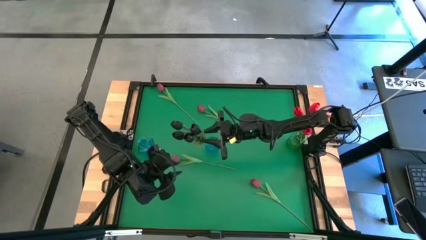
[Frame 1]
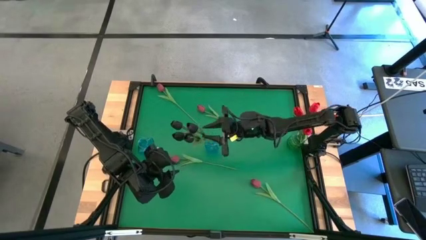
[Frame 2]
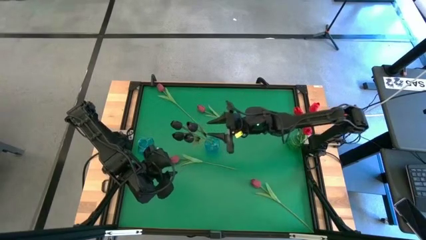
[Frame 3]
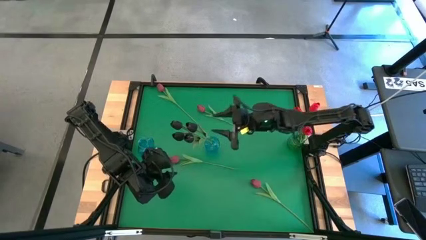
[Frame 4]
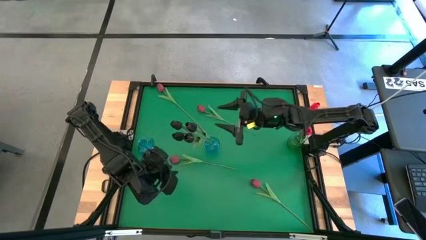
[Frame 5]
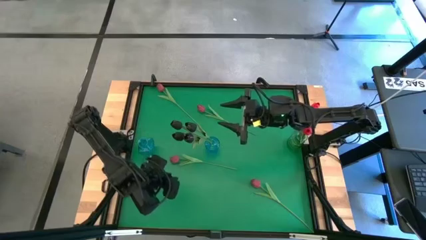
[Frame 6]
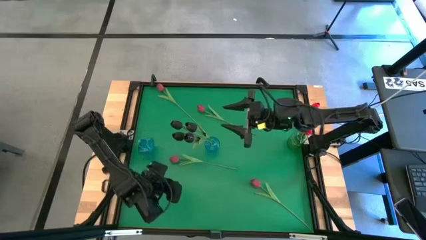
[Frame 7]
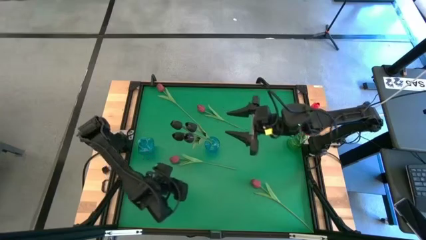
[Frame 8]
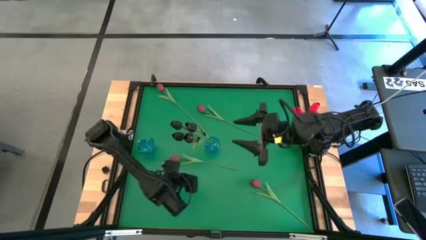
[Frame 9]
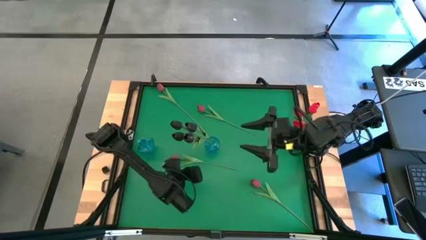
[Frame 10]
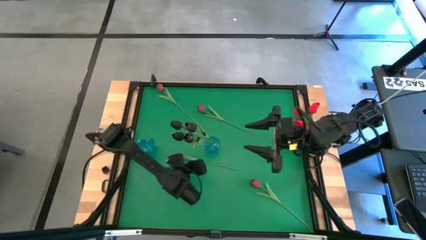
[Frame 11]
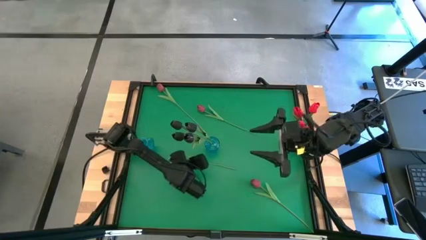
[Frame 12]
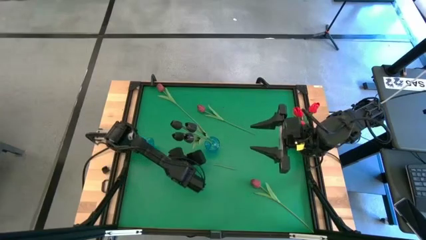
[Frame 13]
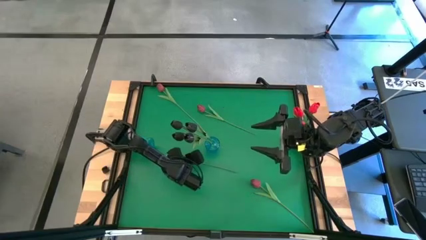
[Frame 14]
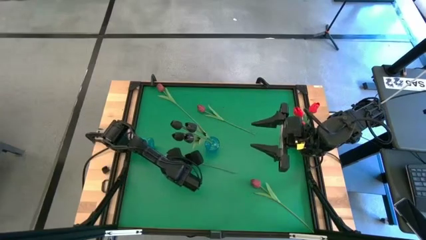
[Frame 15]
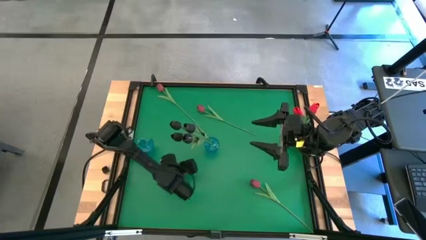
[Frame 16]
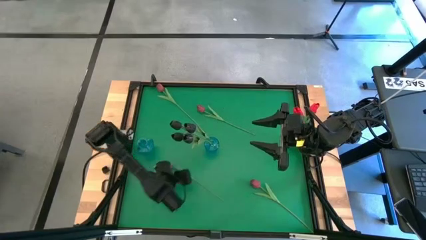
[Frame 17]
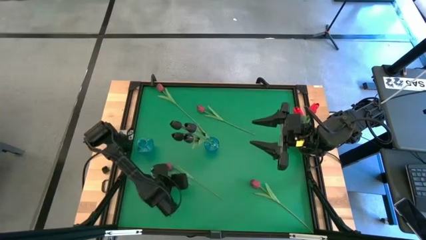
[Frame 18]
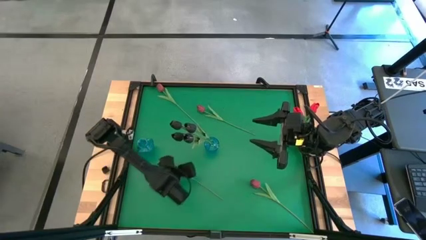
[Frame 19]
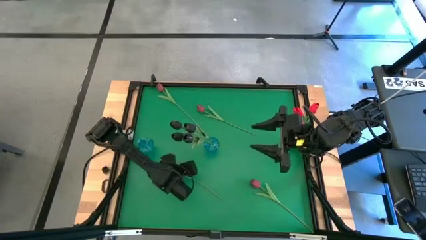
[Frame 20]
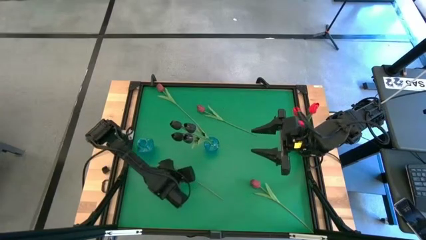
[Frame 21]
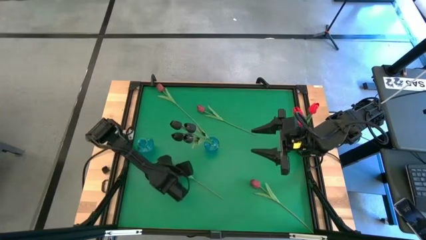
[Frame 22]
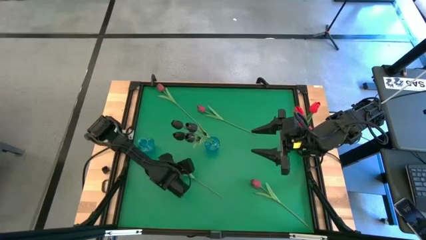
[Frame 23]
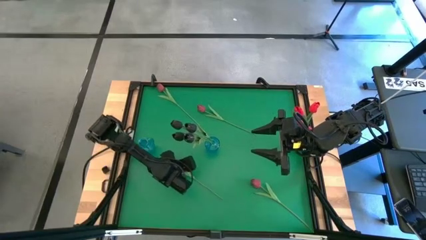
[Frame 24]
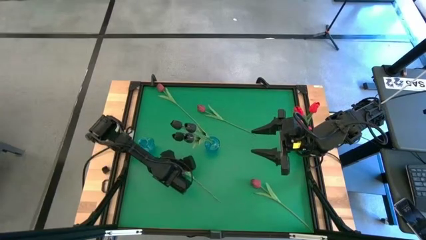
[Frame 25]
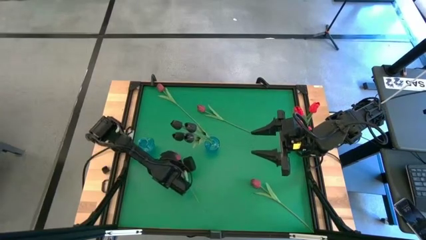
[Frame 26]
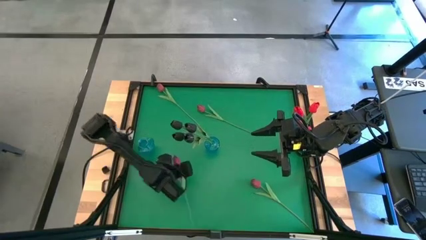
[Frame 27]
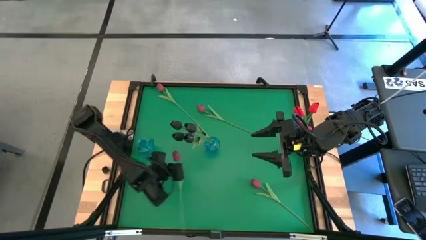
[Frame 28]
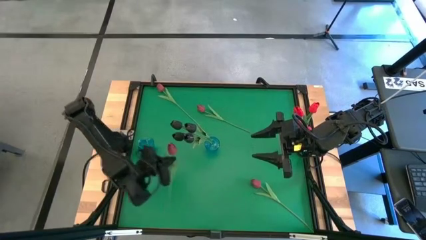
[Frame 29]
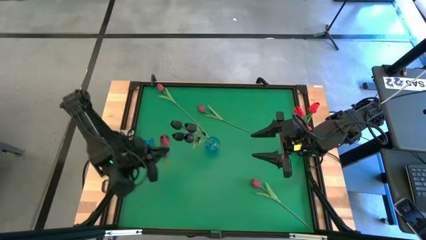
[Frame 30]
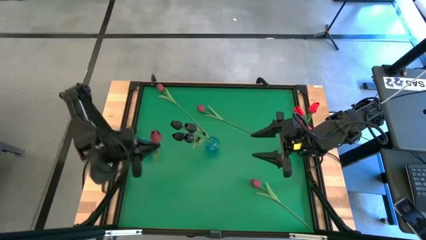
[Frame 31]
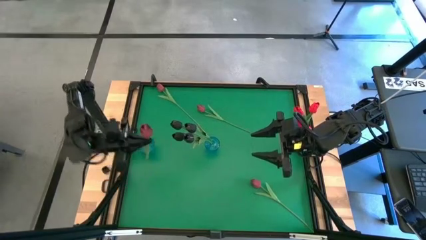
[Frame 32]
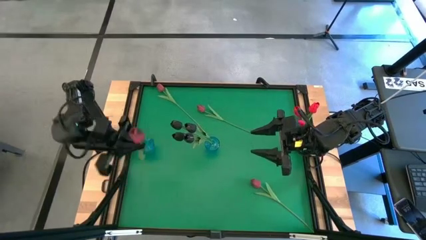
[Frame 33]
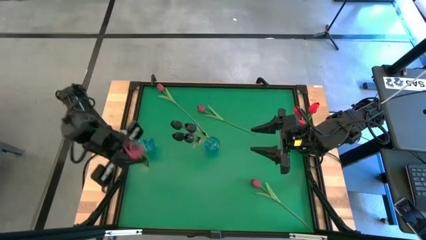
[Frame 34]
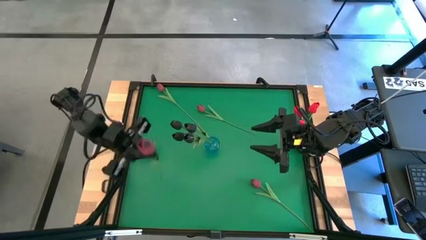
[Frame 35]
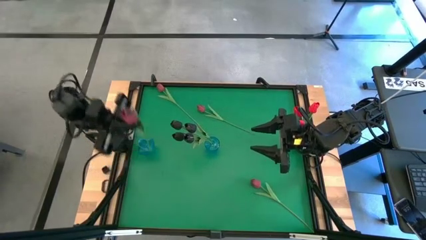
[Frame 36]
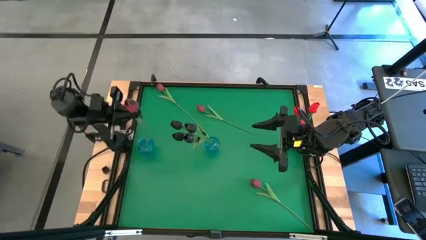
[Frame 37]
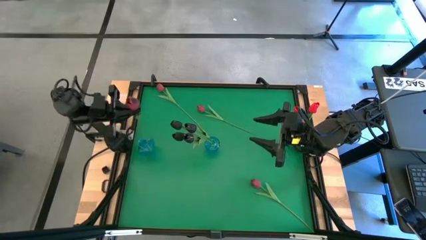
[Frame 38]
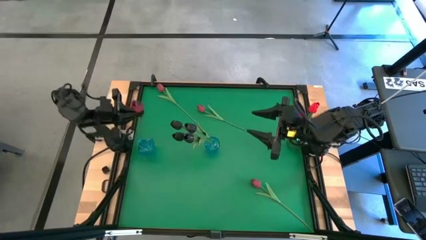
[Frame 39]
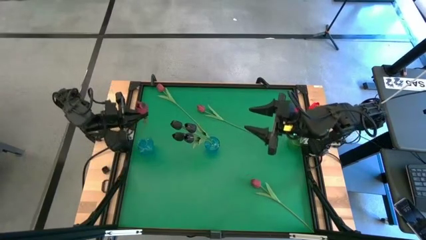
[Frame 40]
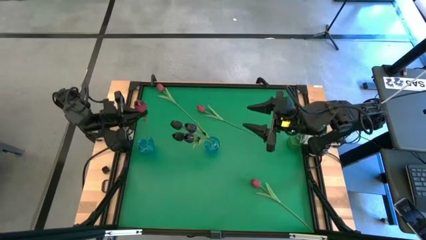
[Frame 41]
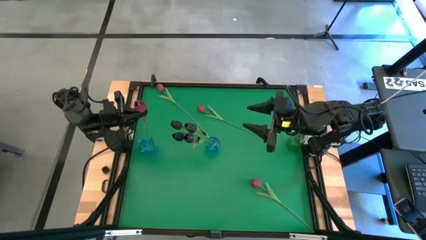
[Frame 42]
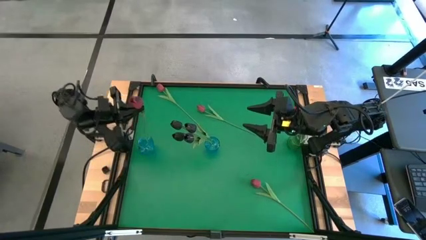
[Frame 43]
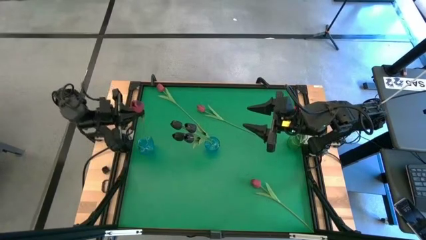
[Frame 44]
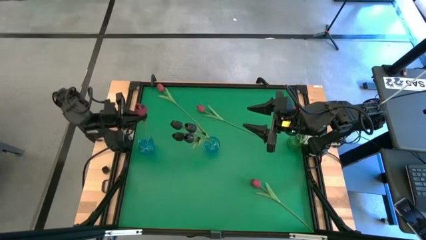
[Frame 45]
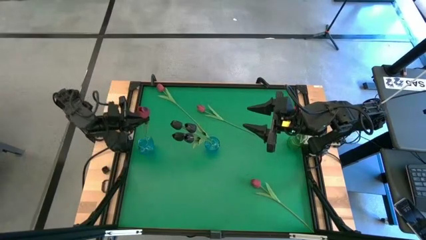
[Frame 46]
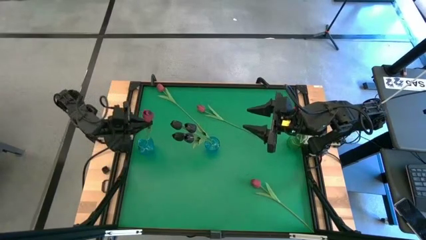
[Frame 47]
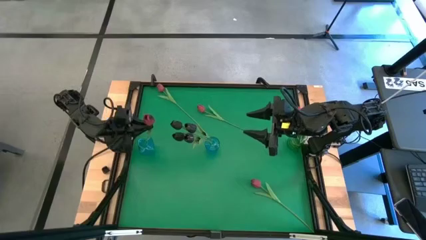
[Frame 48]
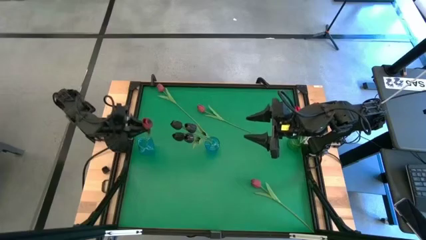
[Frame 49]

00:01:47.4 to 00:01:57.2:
Task: Sort flowers into vase by color
Put the red flower into the left blue flower vase

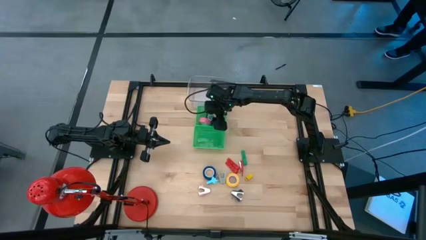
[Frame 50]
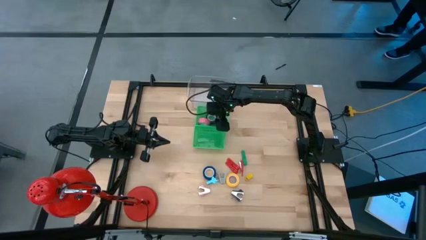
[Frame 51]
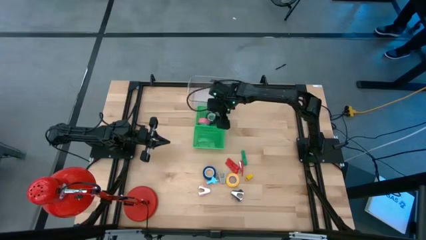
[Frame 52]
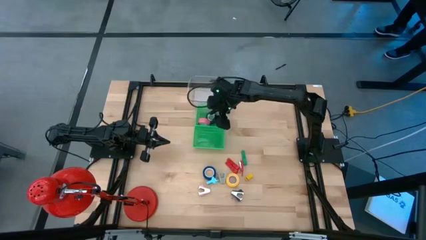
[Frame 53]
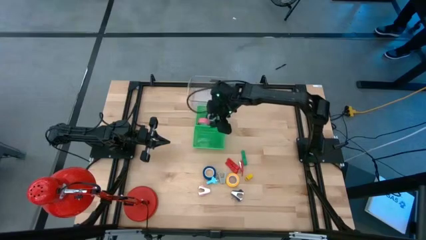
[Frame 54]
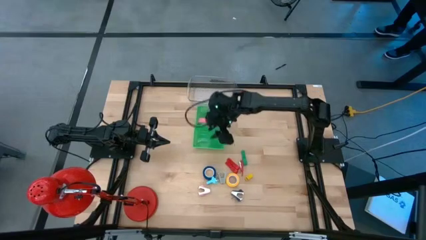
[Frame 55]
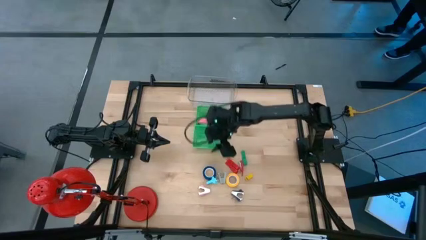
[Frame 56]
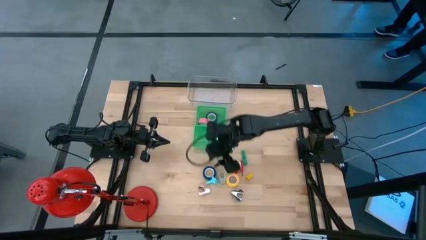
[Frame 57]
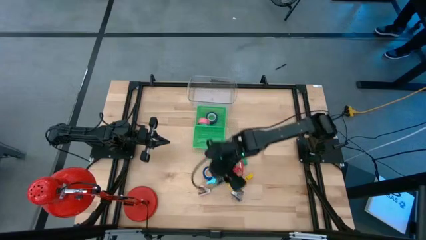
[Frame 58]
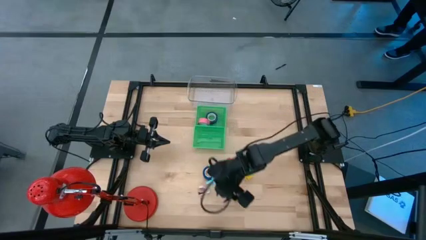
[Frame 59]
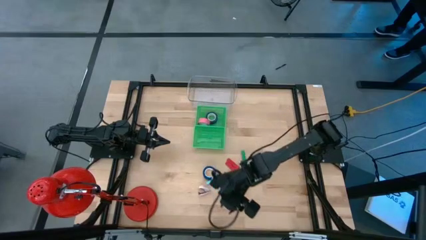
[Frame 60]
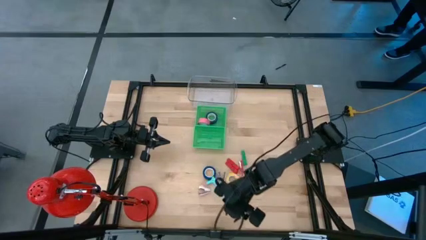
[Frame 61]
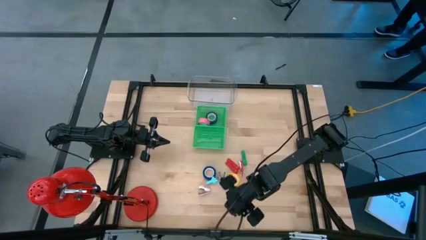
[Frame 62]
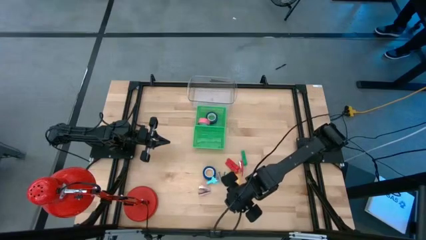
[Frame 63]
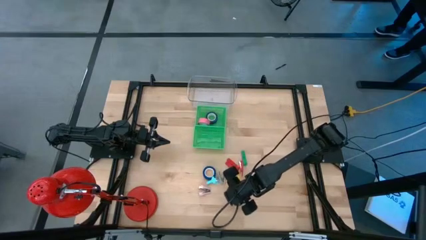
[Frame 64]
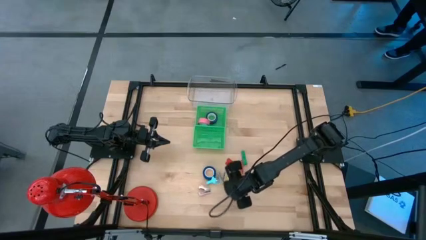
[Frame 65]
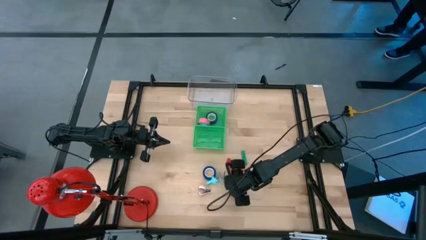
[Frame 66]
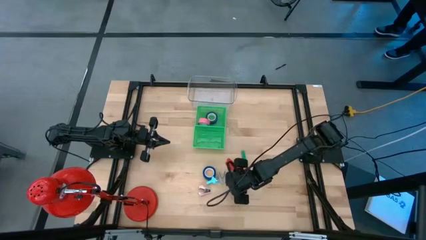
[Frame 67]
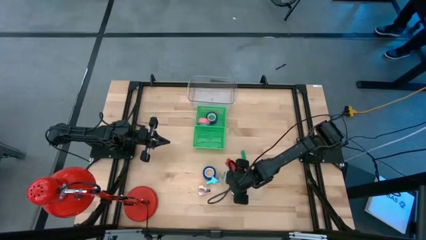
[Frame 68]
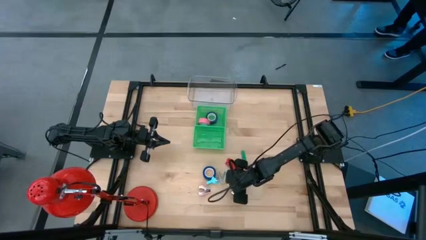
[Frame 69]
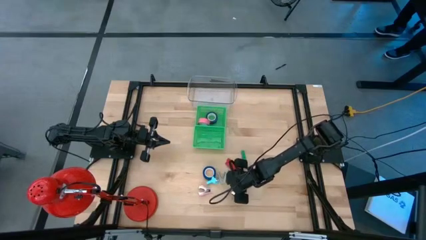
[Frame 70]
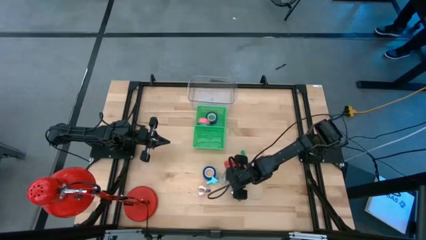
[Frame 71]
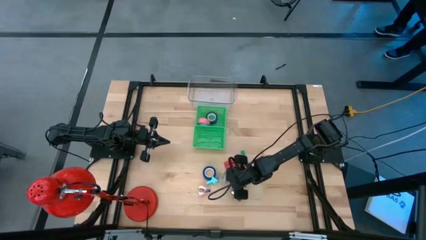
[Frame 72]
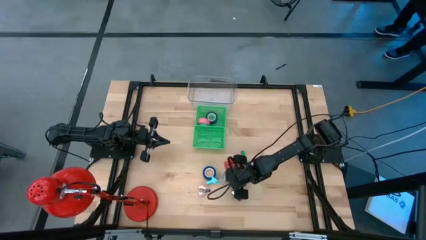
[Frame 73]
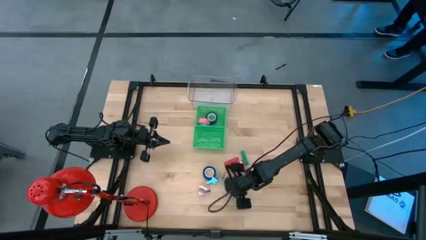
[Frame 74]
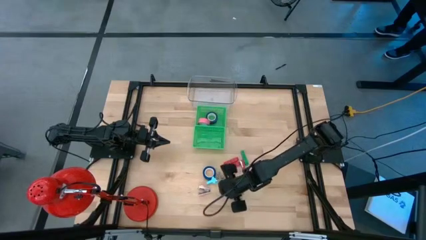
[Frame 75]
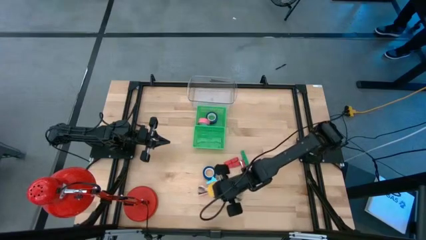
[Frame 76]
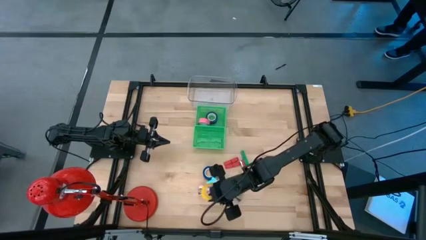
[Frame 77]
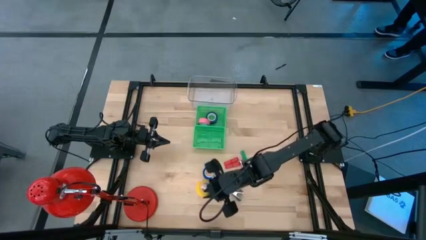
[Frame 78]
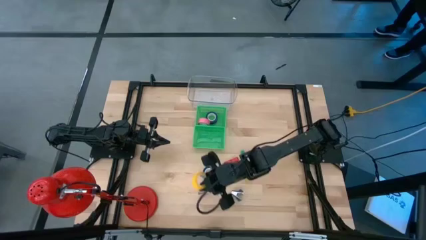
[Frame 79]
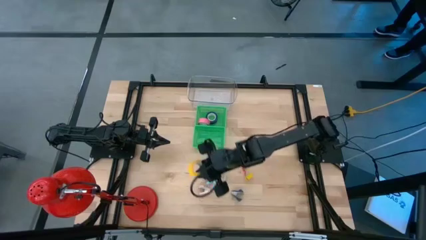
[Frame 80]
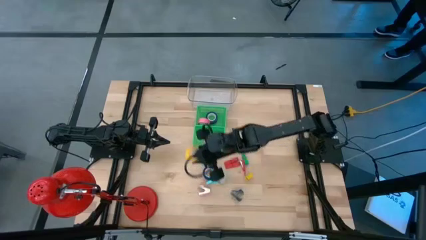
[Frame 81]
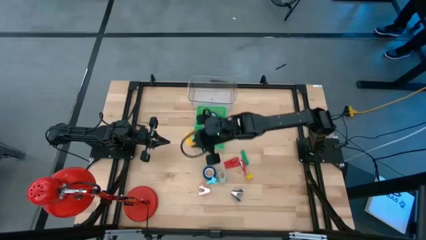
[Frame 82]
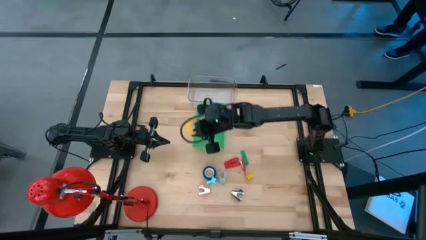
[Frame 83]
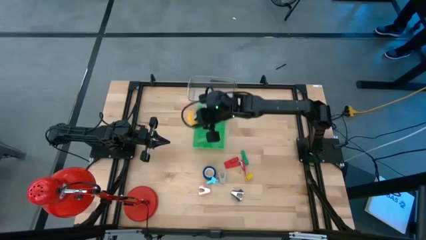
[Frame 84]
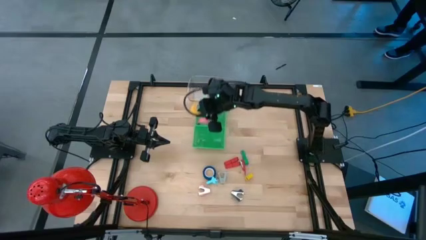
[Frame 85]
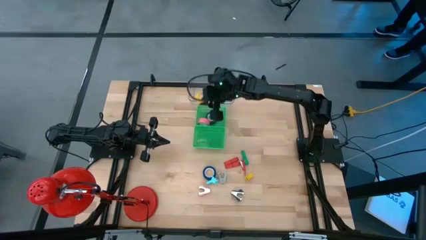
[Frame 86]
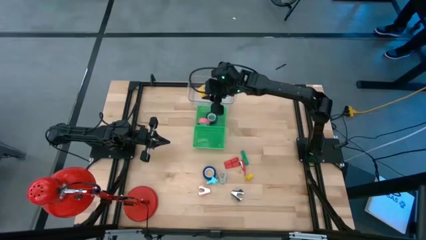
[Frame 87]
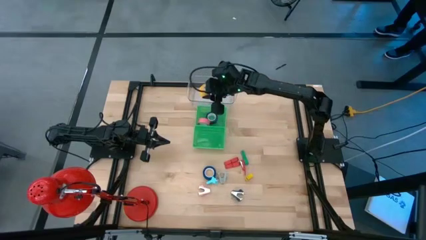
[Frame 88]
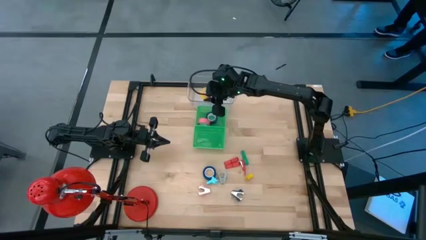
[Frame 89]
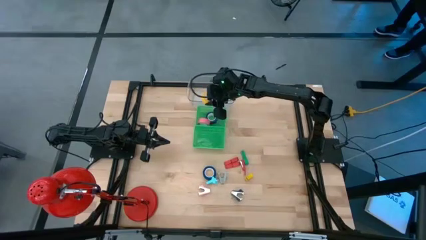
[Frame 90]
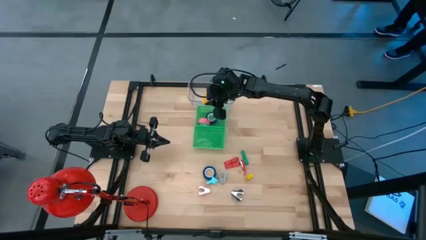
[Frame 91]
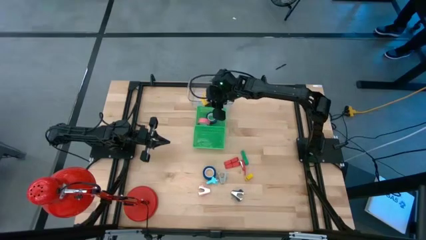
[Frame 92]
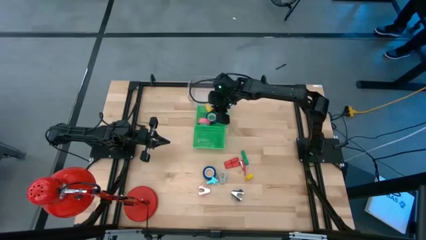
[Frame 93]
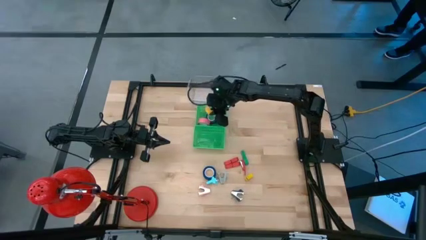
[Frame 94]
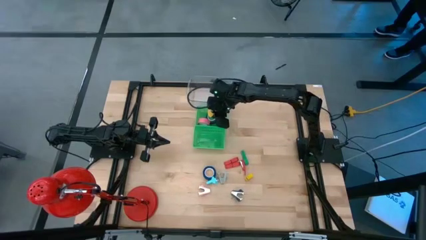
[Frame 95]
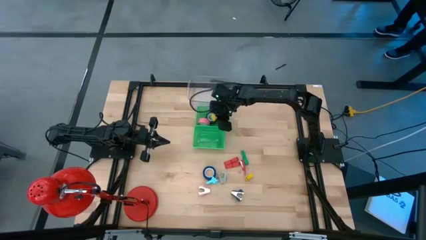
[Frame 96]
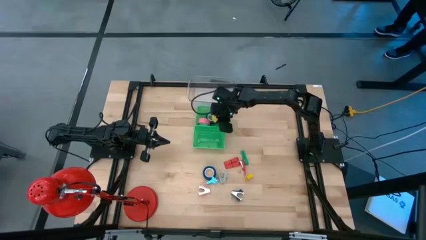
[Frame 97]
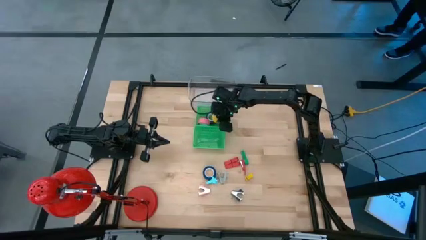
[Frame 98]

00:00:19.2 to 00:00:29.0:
Task: Pick and place Stapler, Stapler remover, tape
Put the yellow tape into the top green bin
